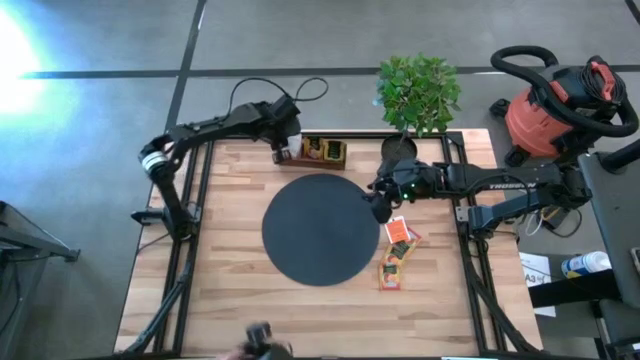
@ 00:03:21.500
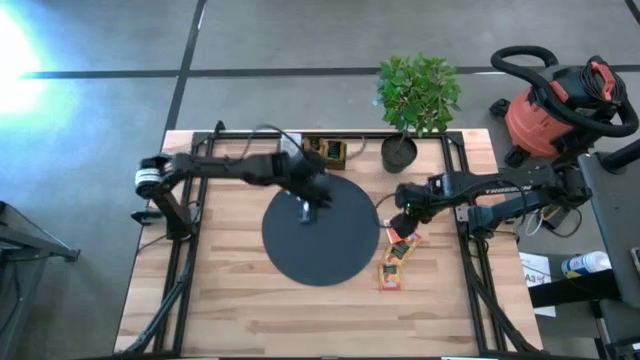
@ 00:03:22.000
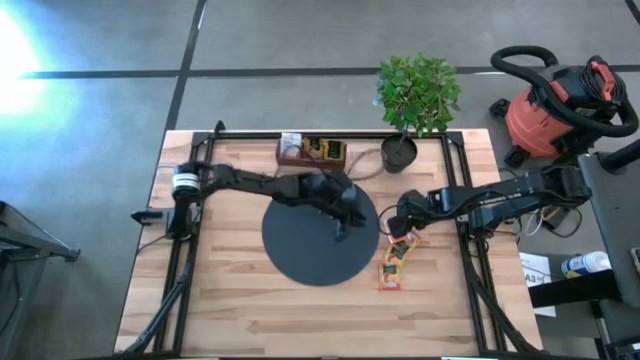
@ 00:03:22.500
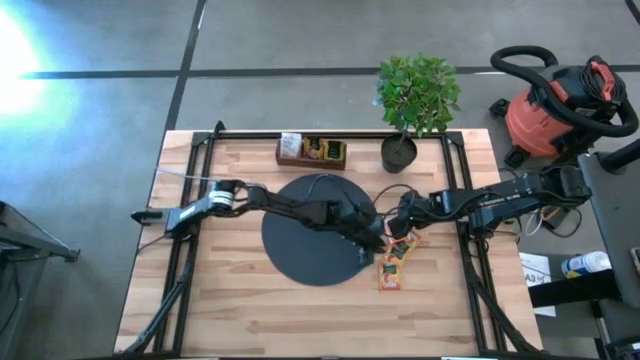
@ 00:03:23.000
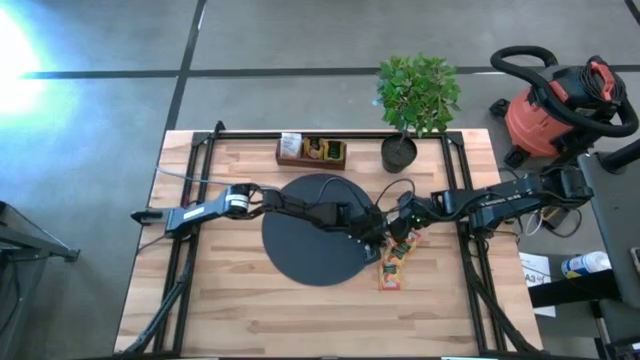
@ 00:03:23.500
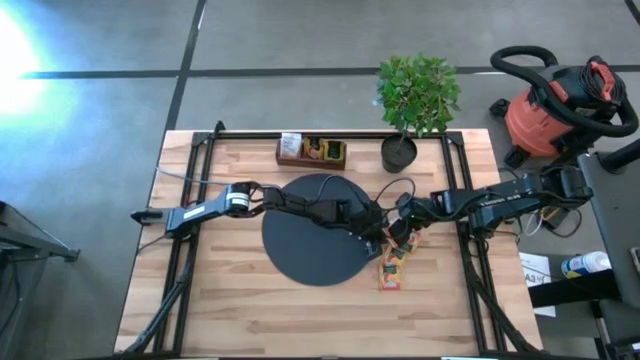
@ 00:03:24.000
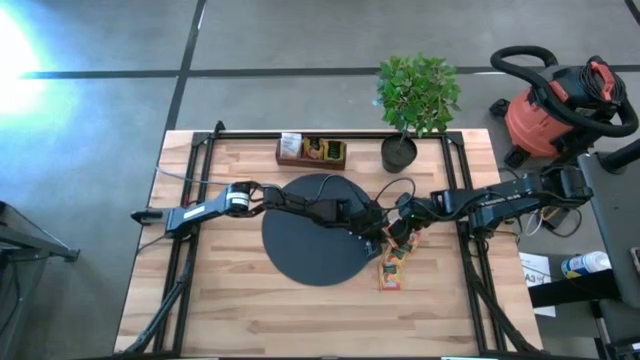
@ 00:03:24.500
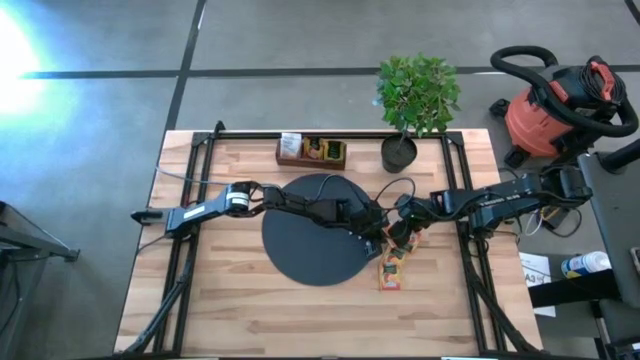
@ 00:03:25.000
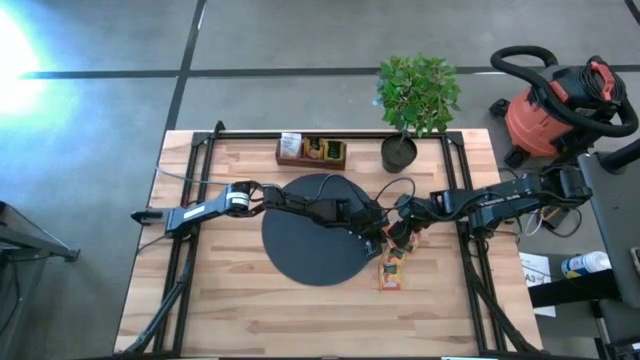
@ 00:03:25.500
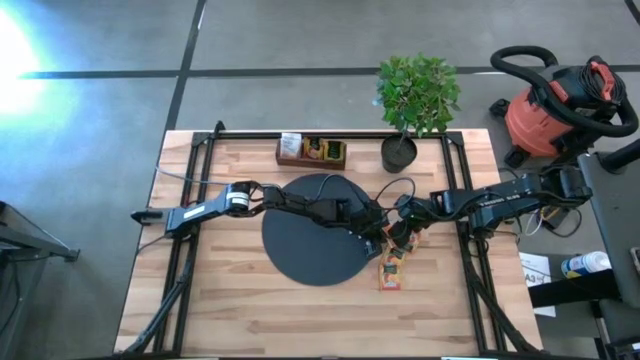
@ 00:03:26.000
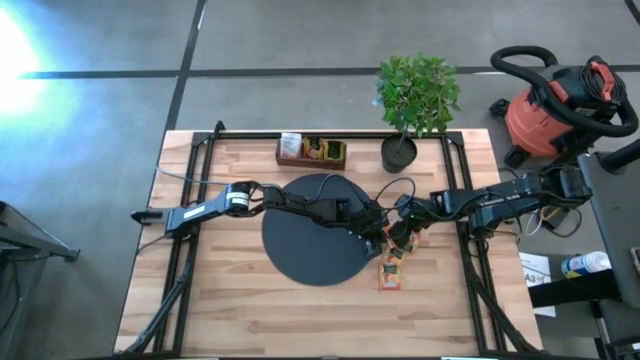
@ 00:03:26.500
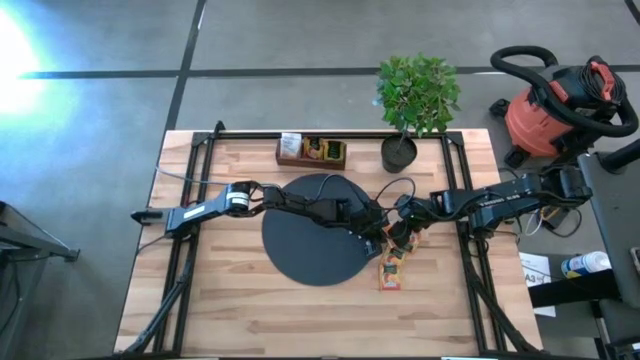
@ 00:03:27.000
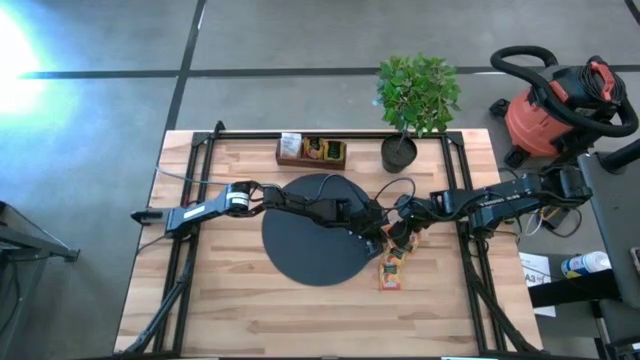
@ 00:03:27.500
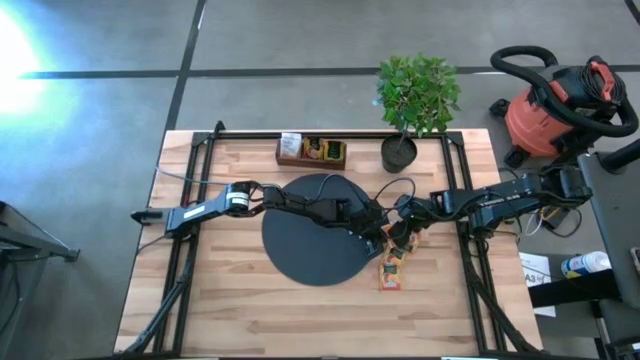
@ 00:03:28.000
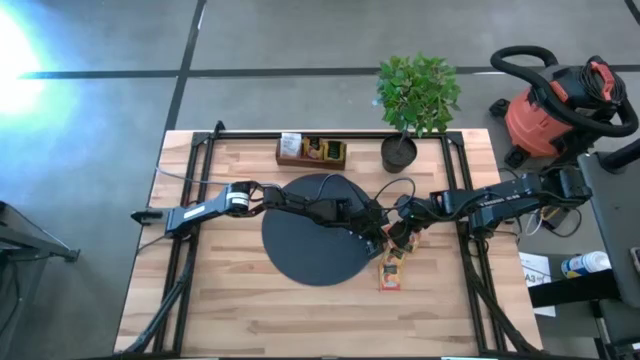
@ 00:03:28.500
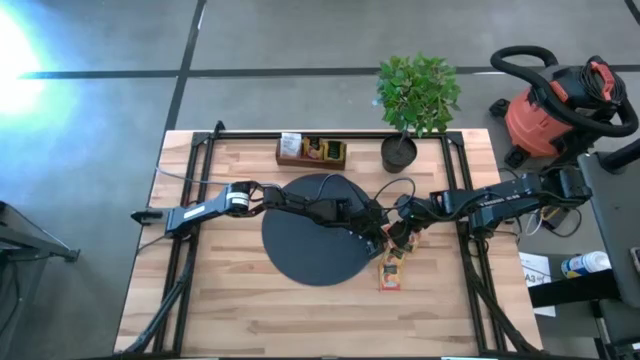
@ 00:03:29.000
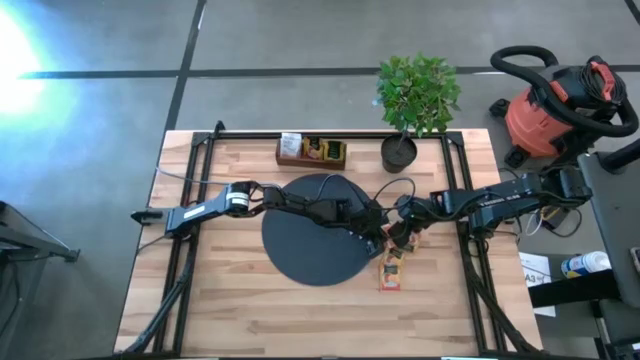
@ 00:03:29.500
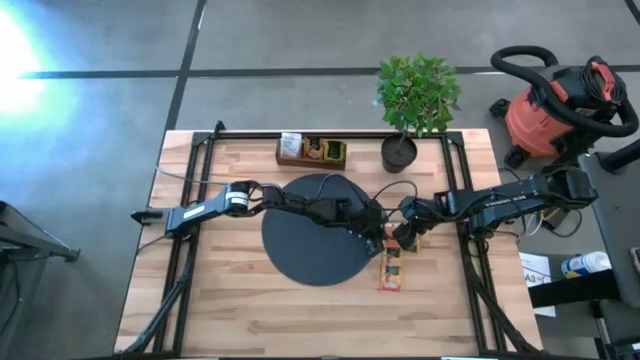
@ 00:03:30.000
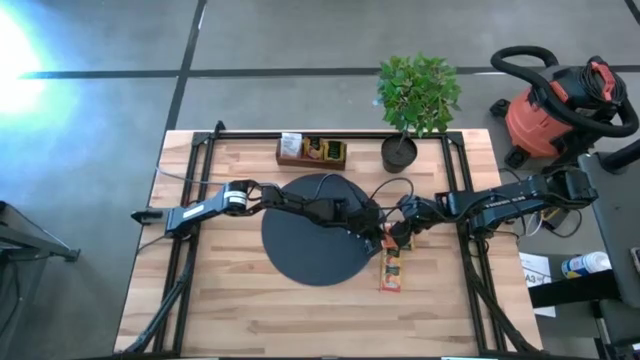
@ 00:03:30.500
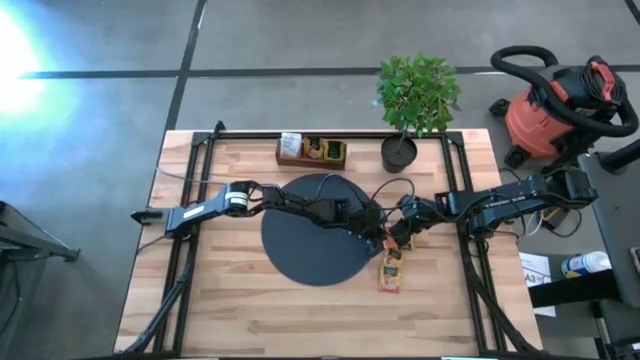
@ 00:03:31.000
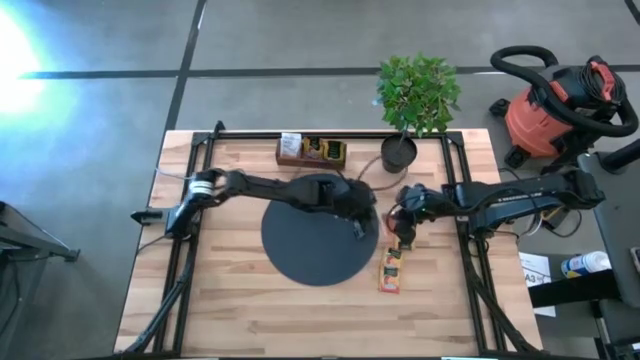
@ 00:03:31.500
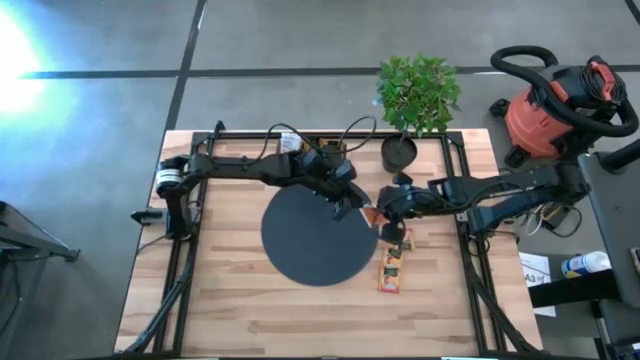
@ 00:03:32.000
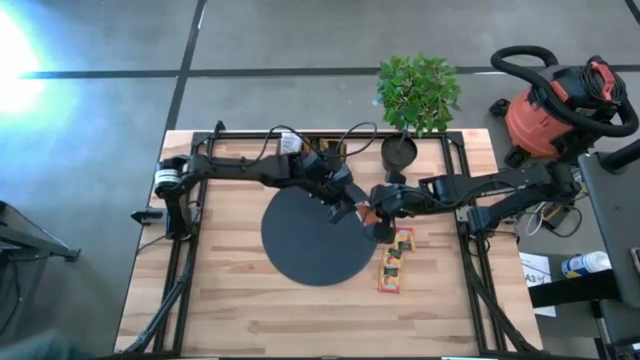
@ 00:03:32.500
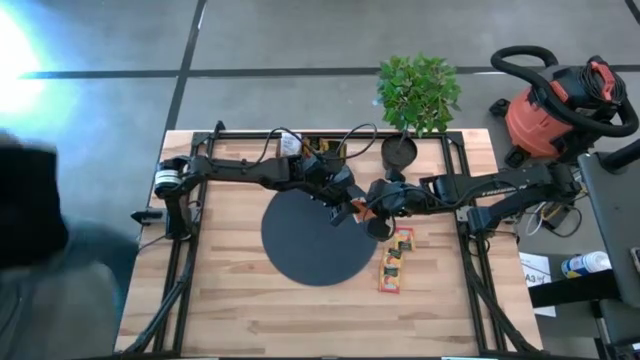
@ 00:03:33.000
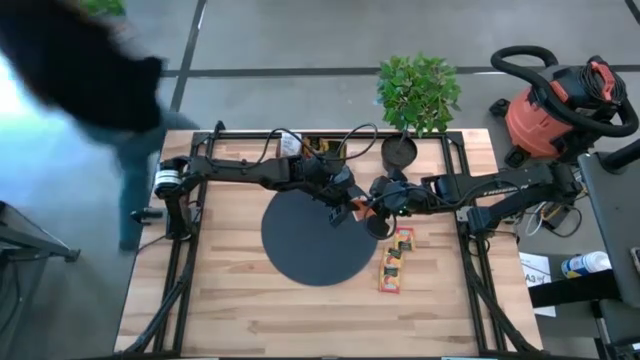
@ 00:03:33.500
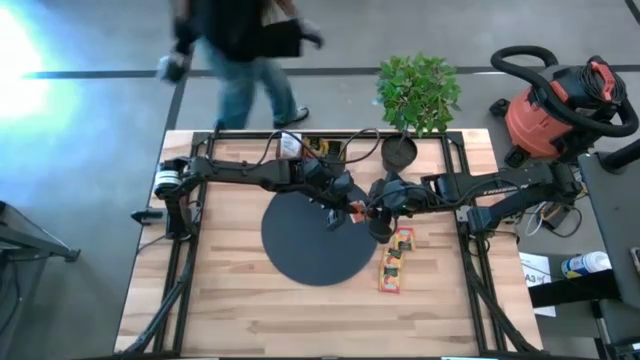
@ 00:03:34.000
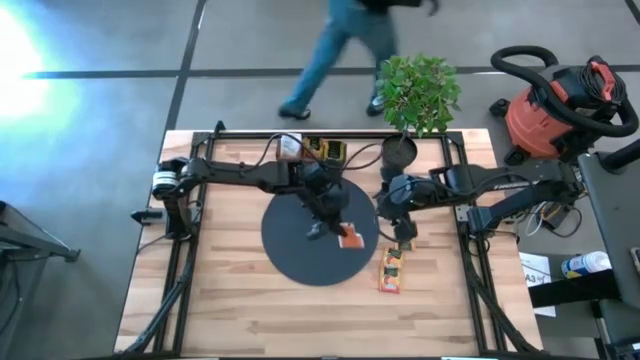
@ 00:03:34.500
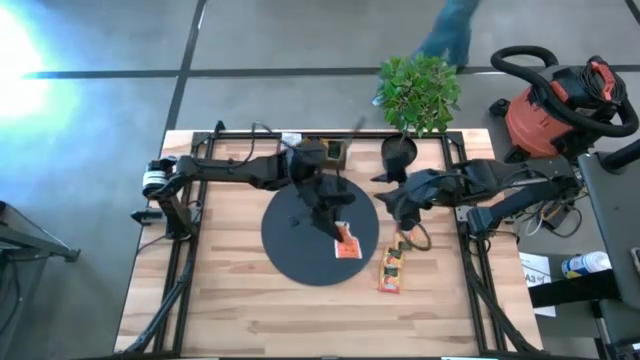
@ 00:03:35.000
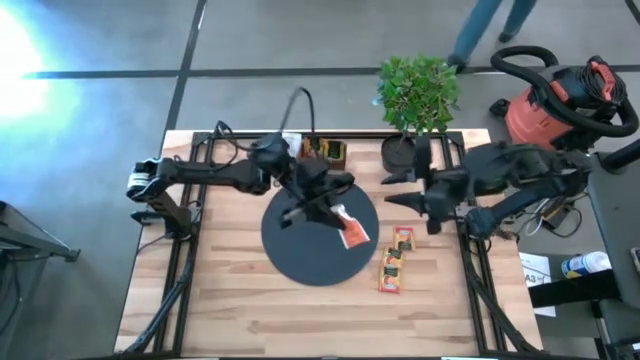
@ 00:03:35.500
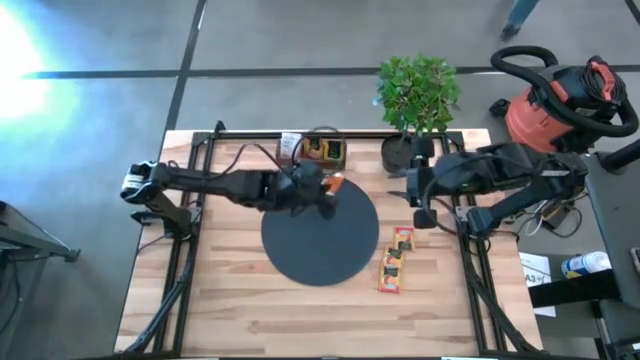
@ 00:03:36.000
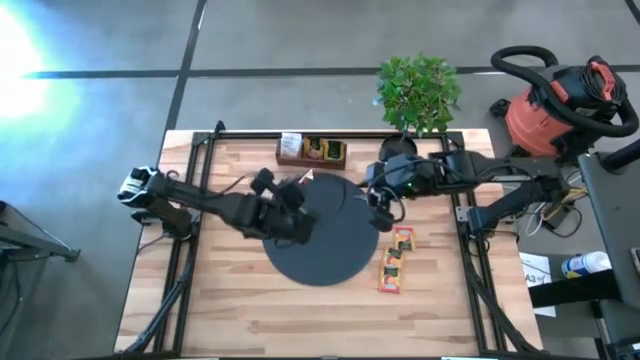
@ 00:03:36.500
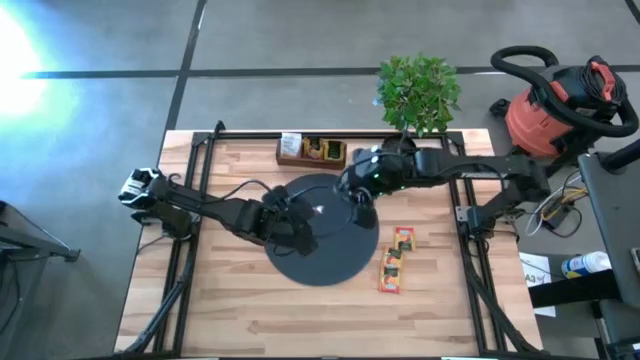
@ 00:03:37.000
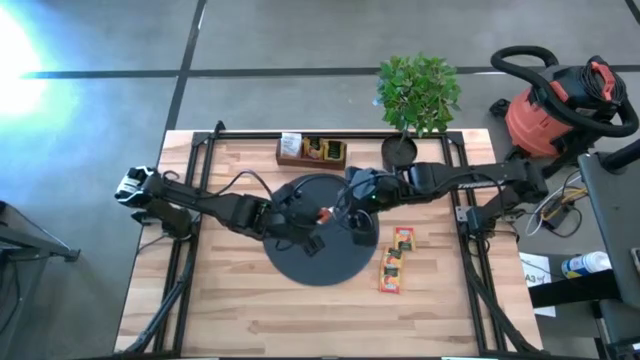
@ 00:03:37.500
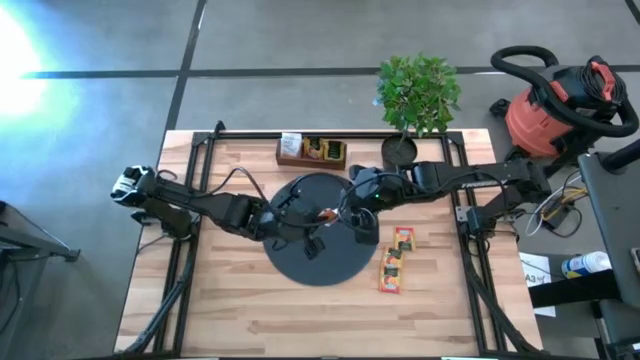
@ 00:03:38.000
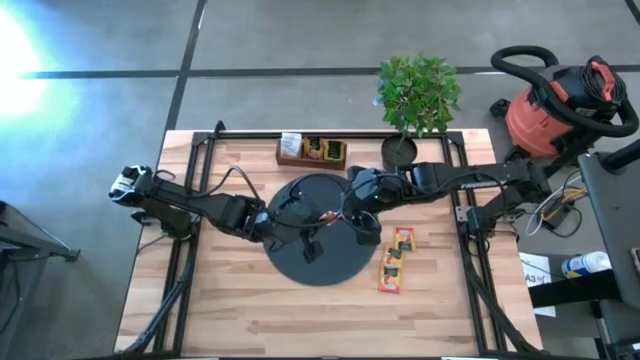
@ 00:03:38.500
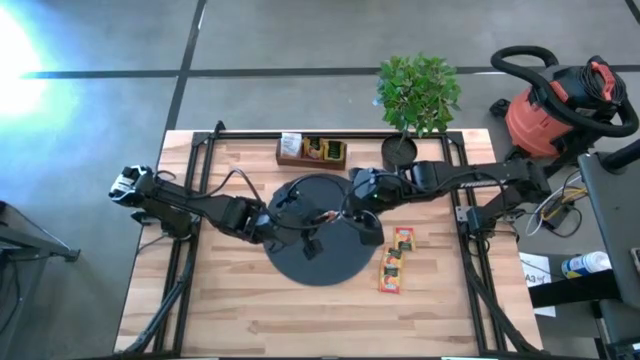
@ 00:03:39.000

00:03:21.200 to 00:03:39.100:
Task: Pick & Place Tea
Put the white tea bag into the left section of the brown wooden organizer
